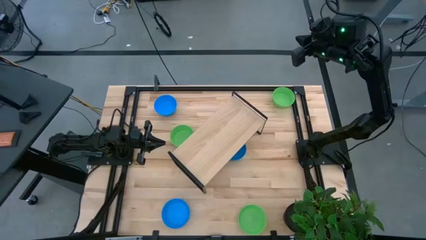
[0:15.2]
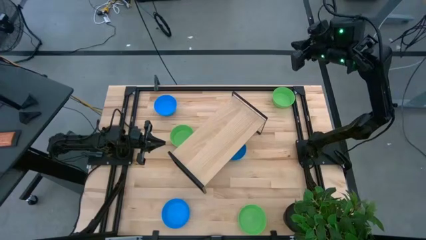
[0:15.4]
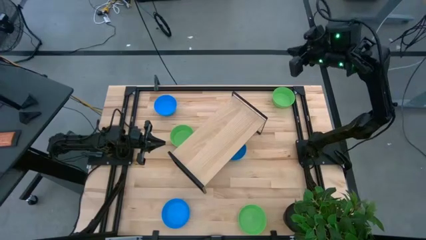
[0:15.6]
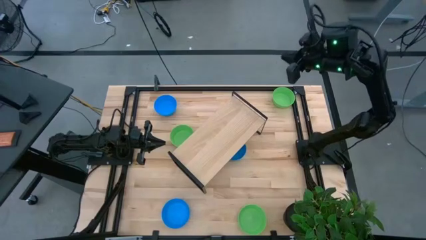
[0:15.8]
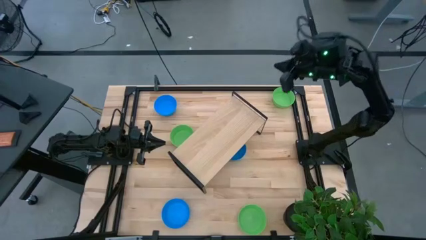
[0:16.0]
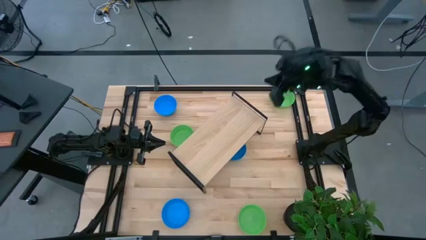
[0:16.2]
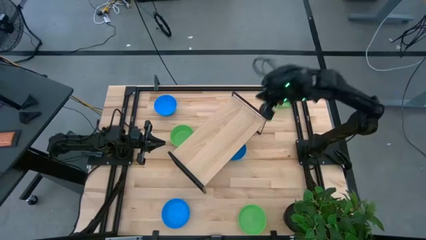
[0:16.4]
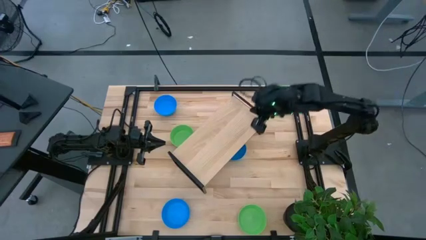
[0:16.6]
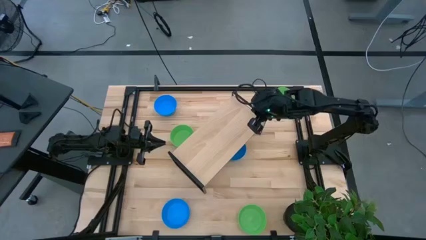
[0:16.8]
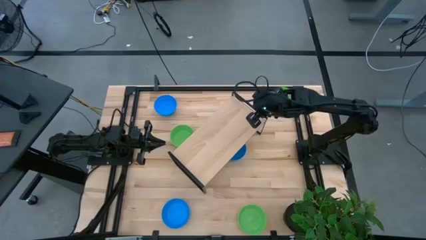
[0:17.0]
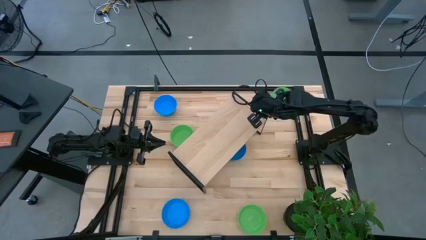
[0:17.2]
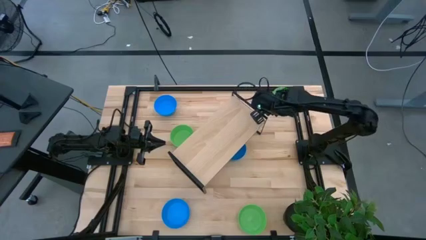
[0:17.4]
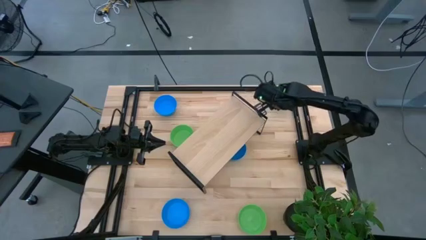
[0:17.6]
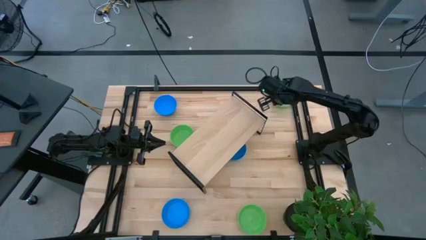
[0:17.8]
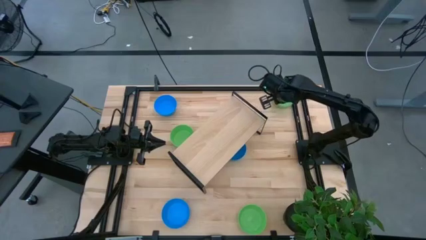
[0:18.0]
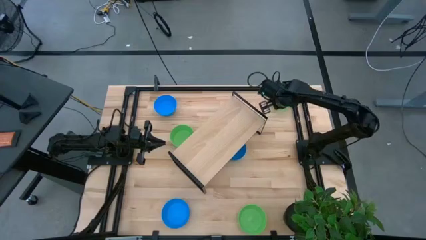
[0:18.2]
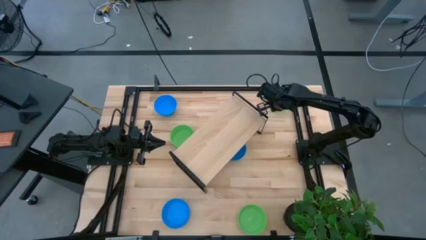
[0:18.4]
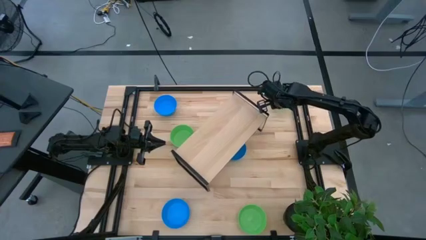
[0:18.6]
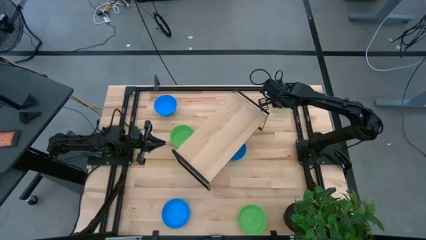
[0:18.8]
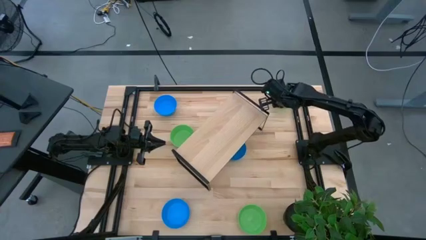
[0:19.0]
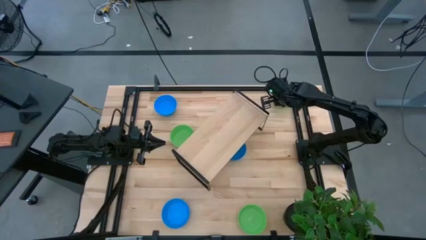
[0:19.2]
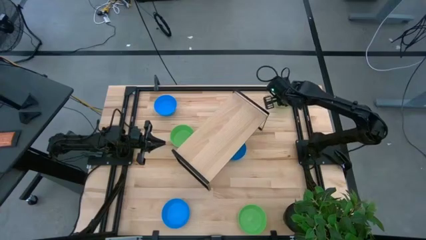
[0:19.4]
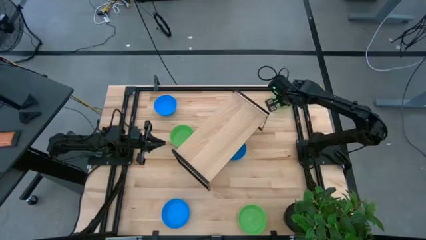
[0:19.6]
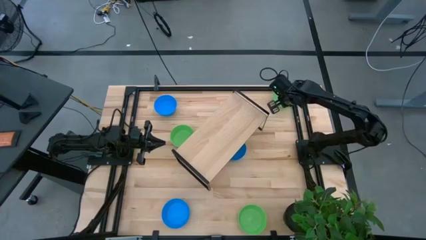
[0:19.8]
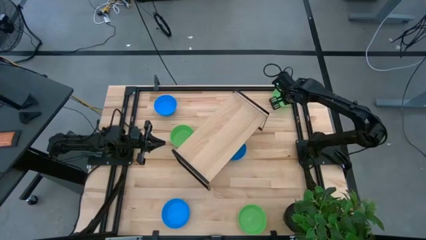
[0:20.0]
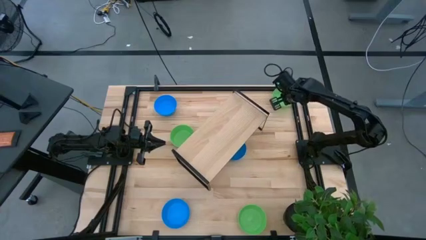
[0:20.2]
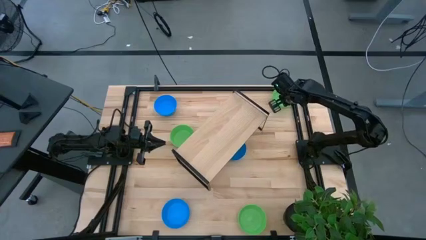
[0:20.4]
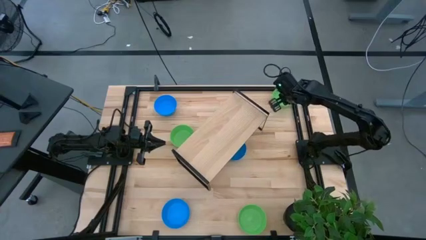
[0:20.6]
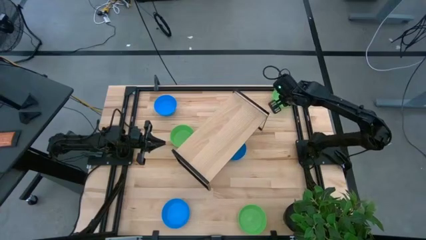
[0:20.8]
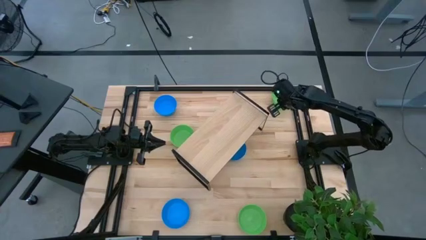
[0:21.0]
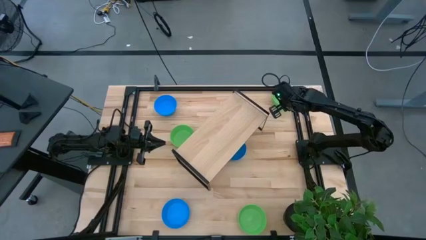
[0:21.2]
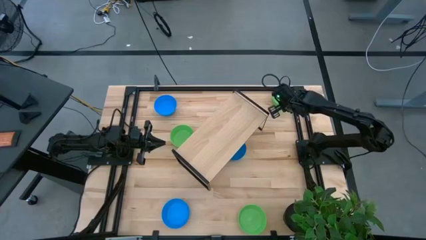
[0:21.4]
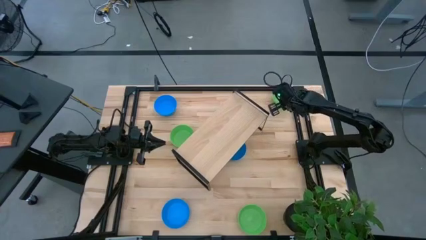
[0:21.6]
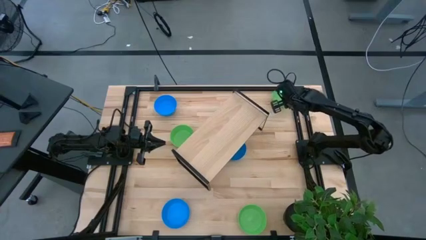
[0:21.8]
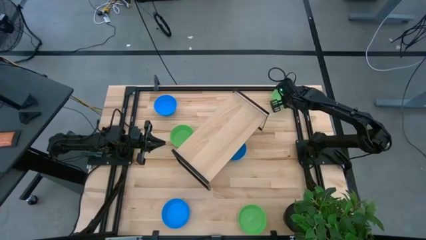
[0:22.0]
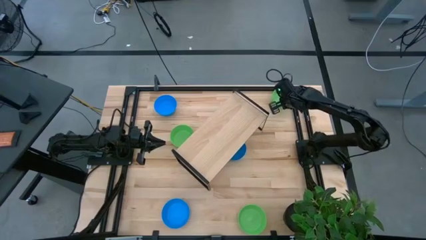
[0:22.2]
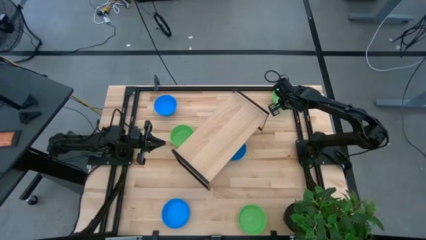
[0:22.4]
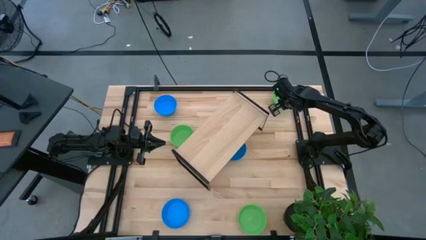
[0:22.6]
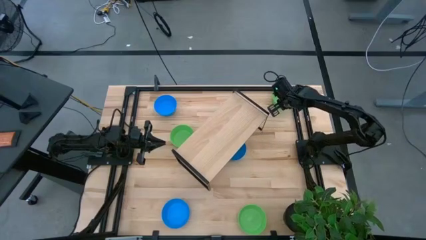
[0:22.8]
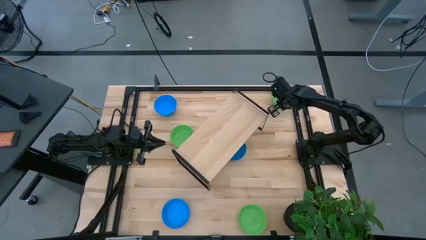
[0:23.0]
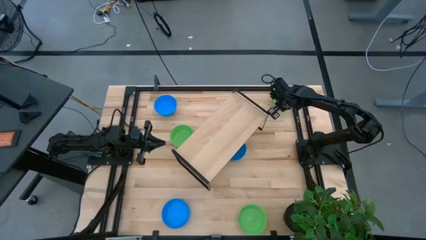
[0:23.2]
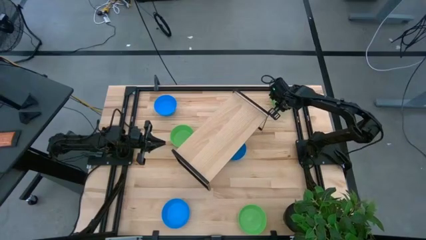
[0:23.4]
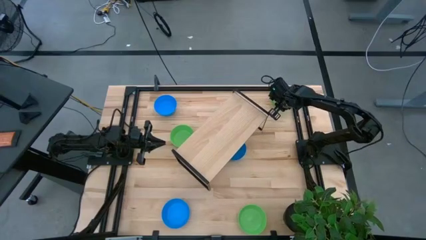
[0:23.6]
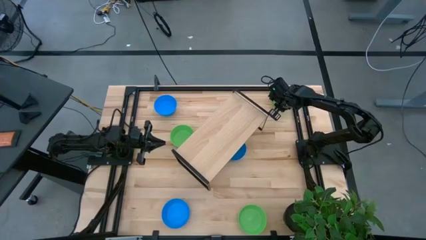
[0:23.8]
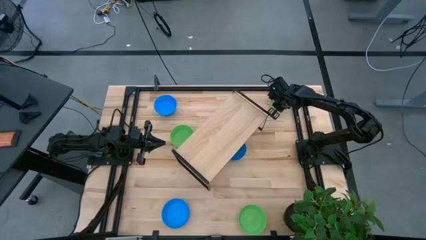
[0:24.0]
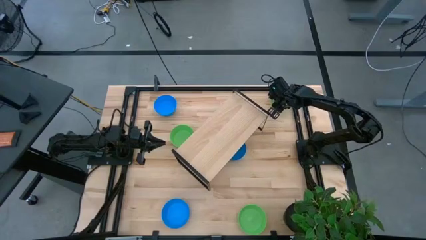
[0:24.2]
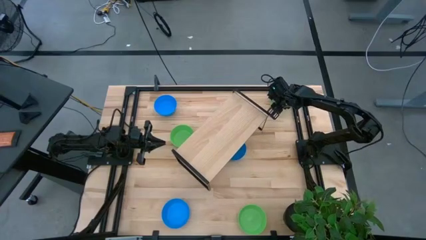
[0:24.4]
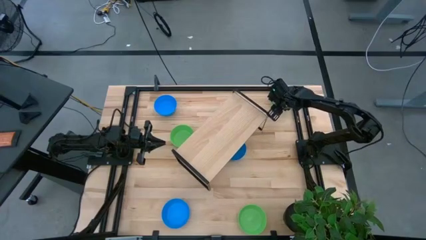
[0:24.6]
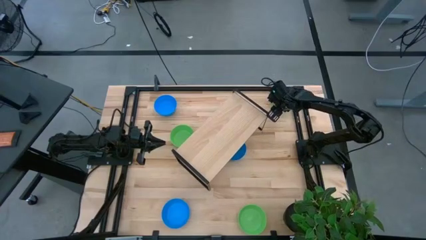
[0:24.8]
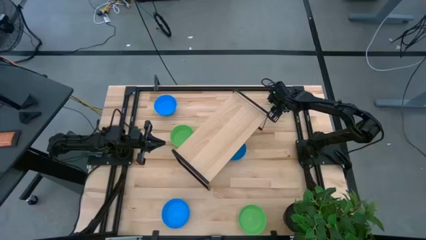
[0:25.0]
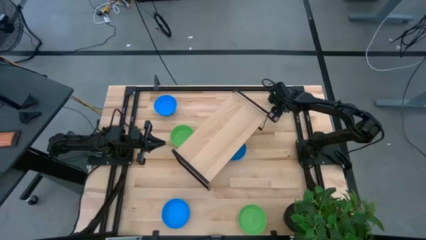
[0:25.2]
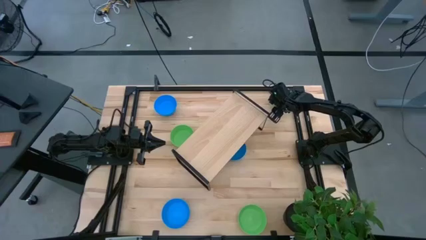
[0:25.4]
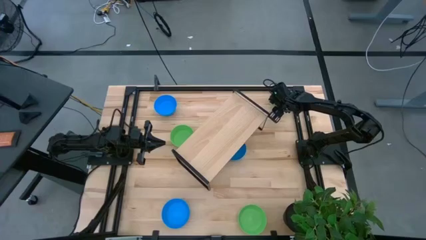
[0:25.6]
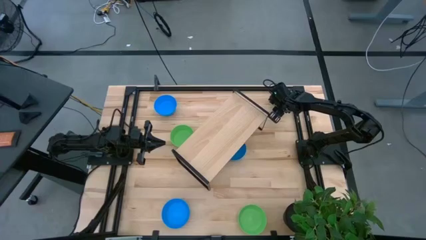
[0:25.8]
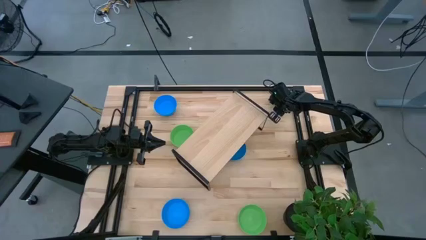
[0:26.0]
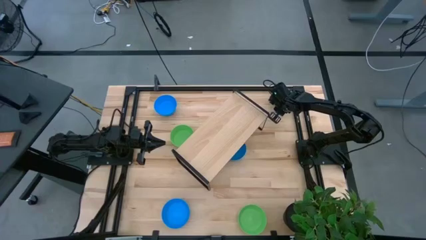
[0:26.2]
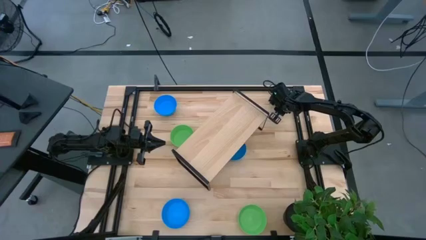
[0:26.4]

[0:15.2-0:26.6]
Task: Pick & Place Mini bowls
Put the top green bowl on the shelf

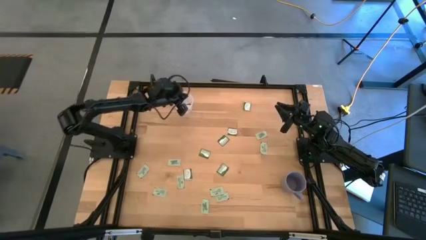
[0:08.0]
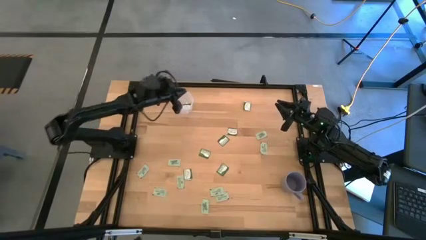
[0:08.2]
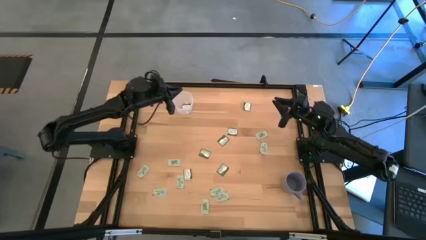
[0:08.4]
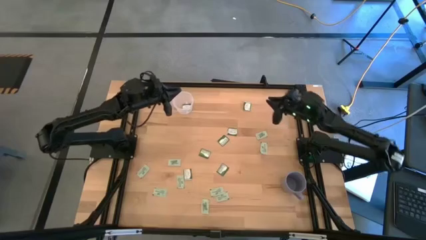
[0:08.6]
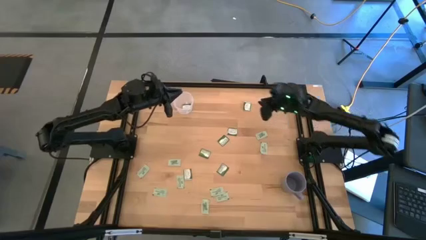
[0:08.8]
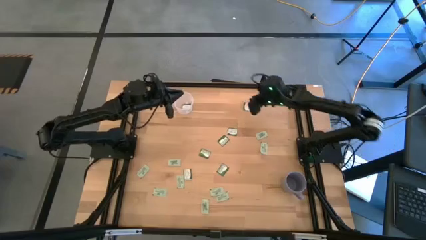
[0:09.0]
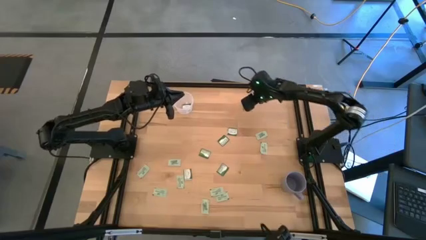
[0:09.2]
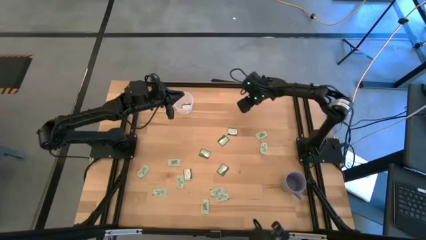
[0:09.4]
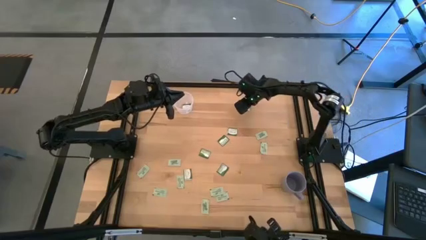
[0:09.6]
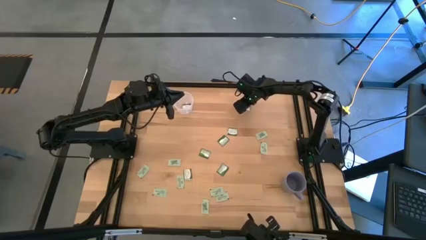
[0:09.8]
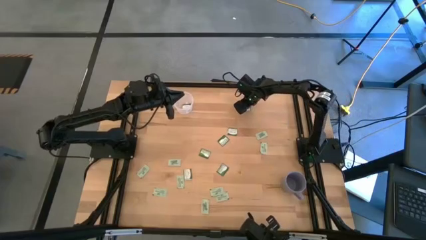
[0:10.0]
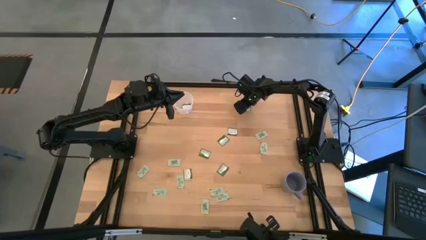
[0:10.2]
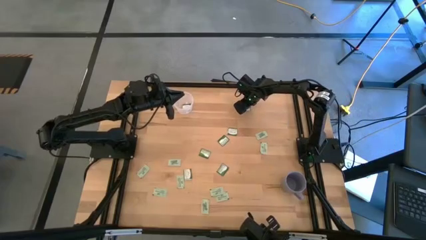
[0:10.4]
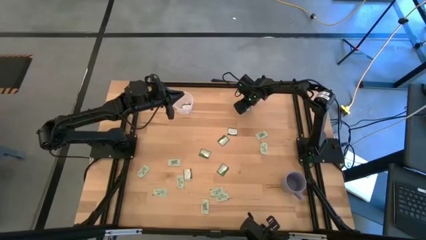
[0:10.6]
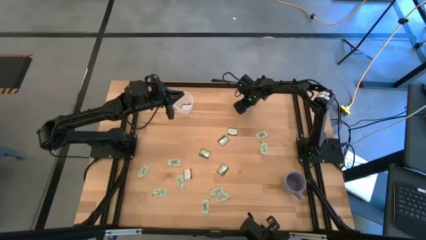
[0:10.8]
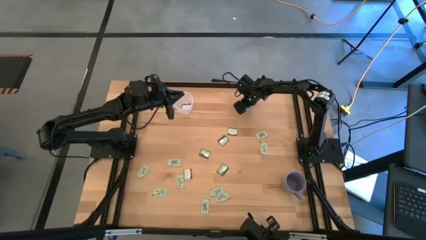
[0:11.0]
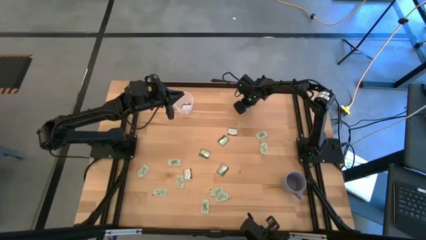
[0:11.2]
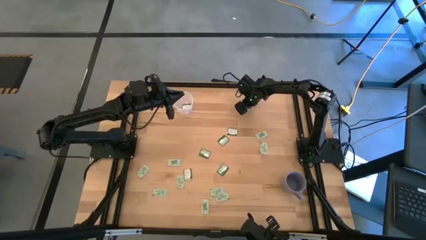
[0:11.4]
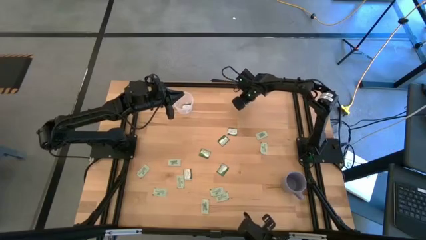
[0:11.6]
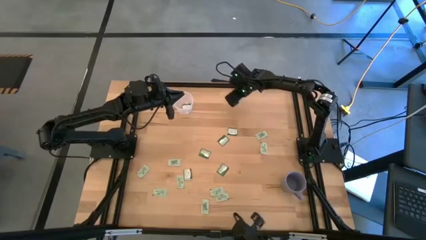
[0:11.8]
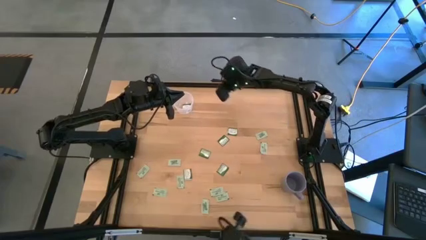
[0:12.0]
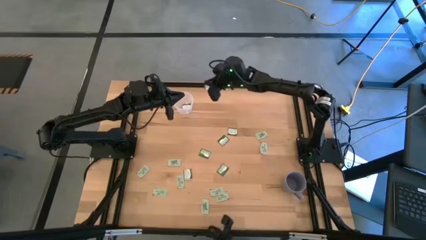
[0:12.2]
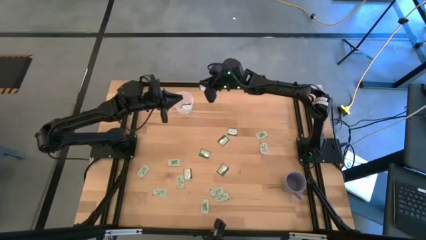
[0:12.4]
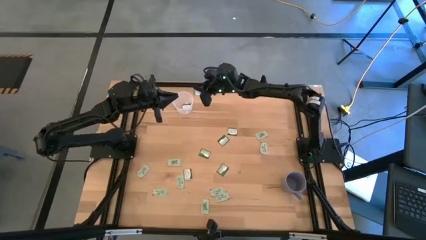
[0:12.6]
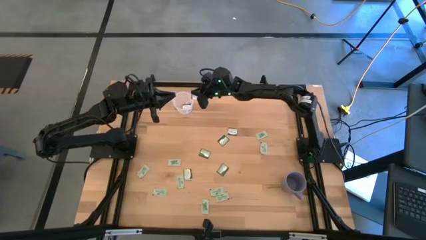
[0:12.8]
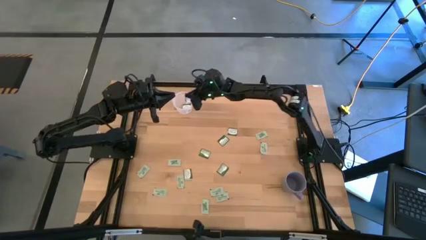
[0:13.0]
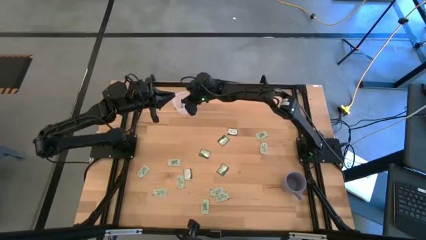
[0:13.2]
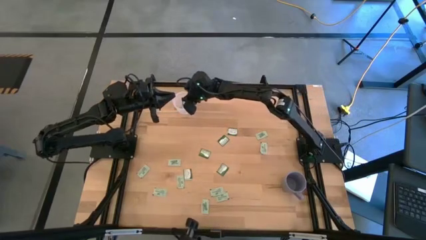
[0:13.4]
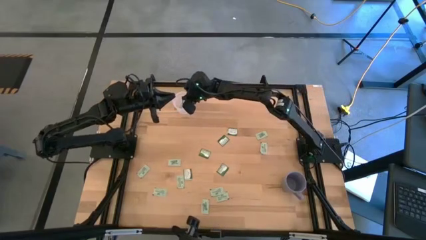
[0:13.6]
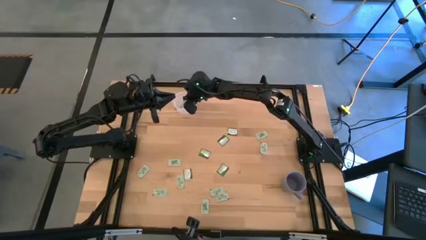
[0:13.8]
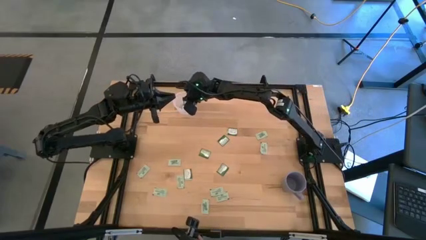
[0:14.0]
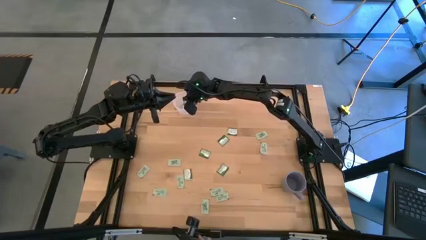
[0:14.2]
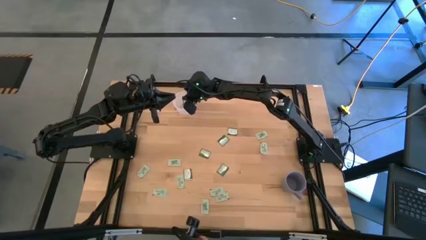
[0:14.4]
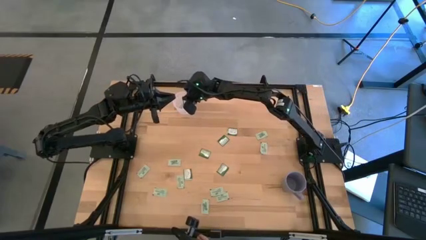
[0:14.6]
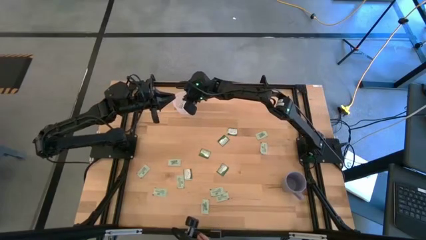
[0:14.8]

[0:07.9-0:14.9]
Task: Pick and place items into bin
Put the truvia packet into the transparent bin
